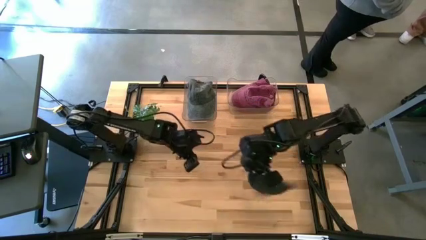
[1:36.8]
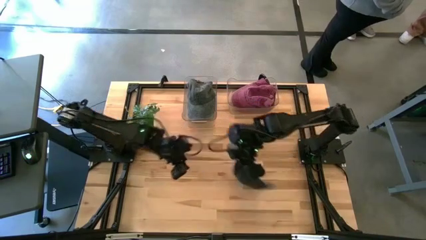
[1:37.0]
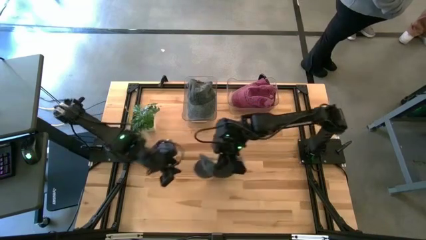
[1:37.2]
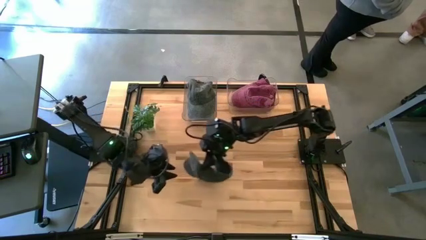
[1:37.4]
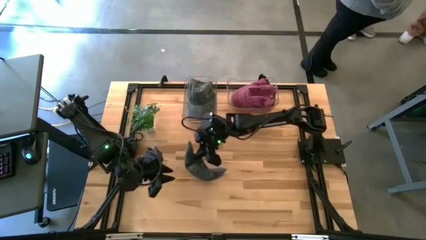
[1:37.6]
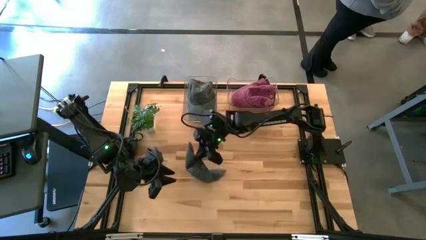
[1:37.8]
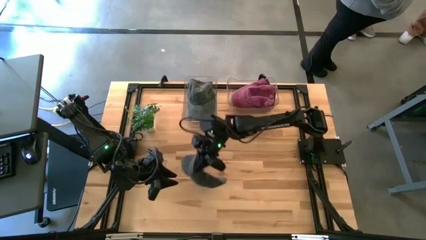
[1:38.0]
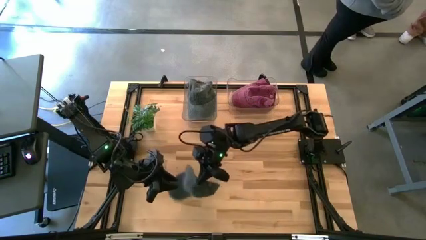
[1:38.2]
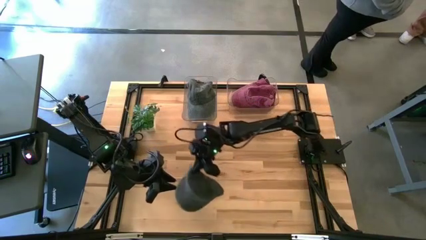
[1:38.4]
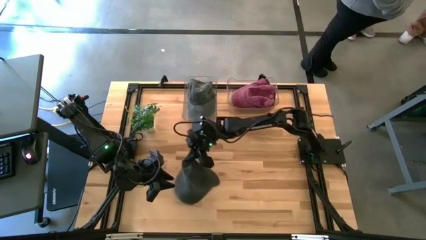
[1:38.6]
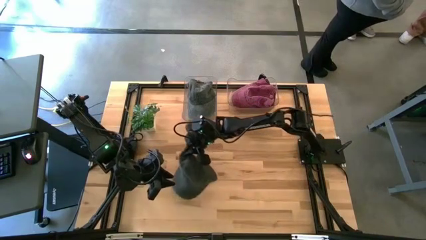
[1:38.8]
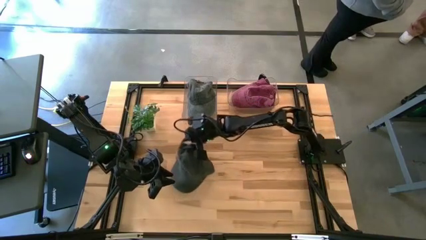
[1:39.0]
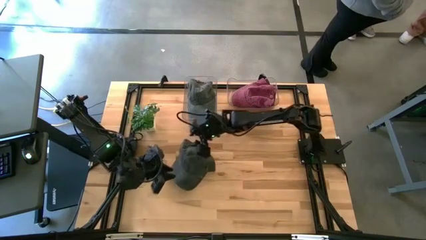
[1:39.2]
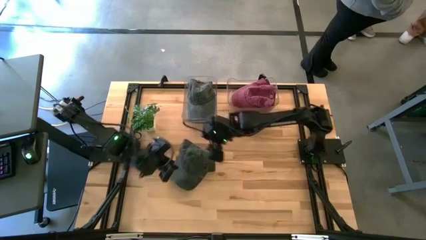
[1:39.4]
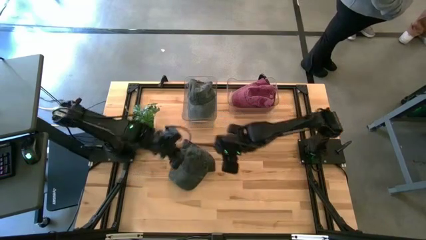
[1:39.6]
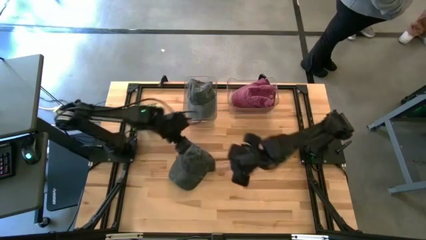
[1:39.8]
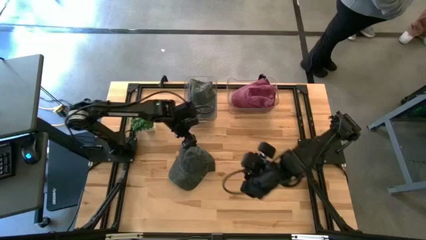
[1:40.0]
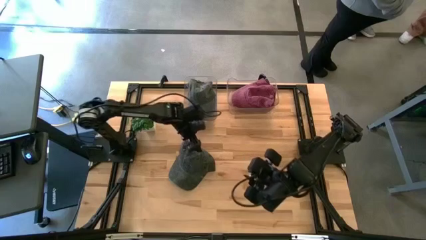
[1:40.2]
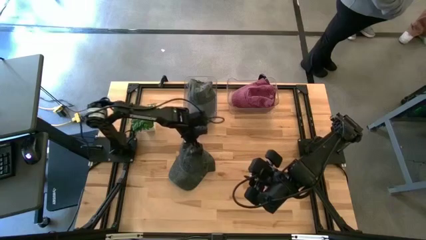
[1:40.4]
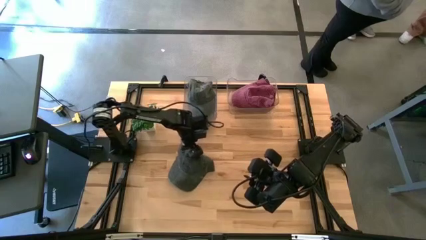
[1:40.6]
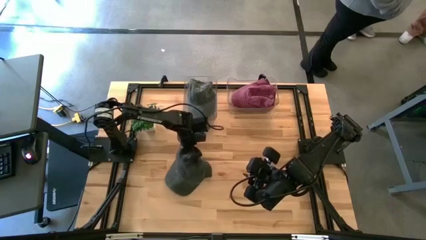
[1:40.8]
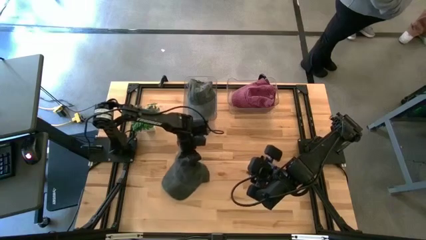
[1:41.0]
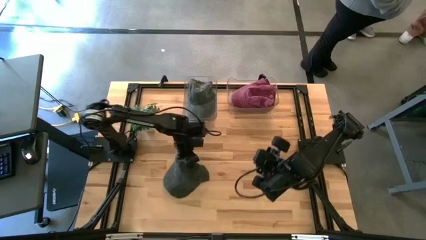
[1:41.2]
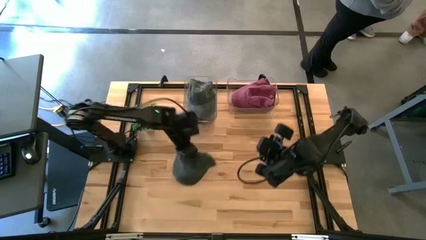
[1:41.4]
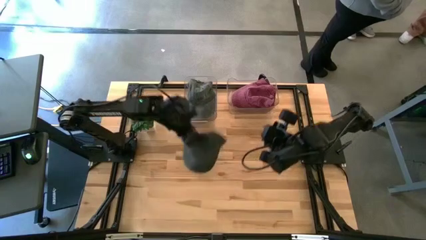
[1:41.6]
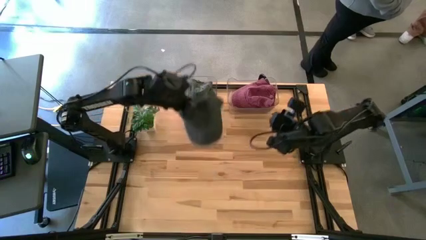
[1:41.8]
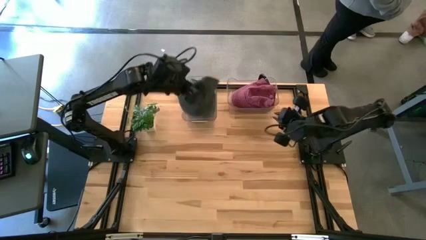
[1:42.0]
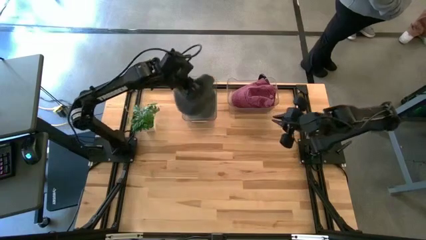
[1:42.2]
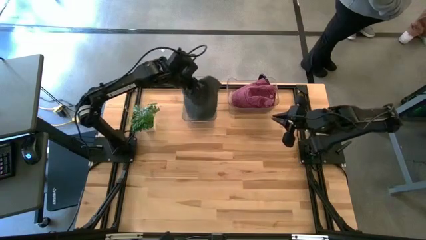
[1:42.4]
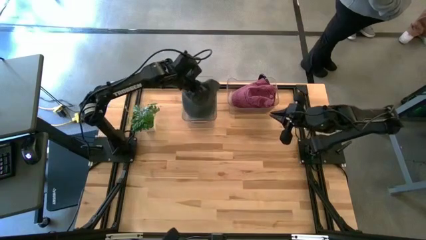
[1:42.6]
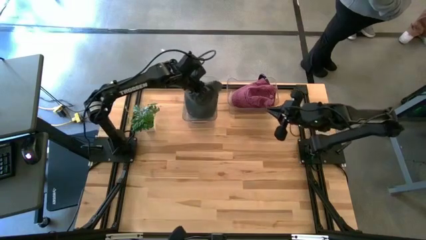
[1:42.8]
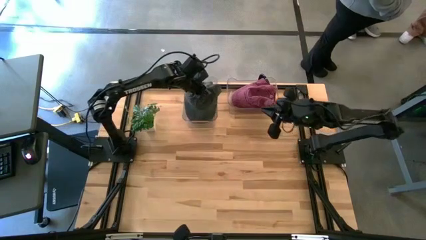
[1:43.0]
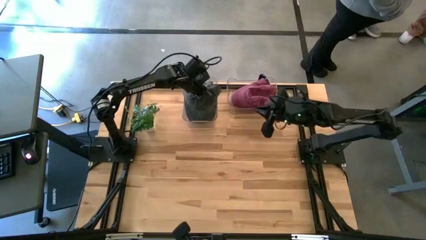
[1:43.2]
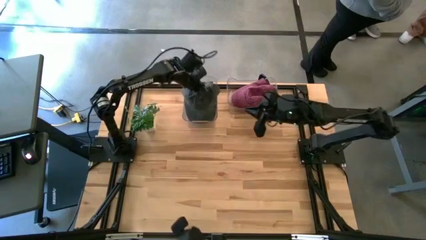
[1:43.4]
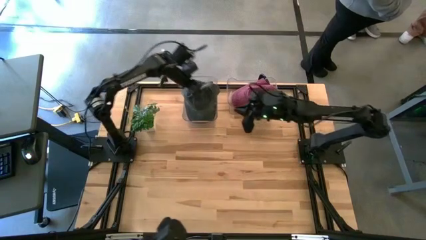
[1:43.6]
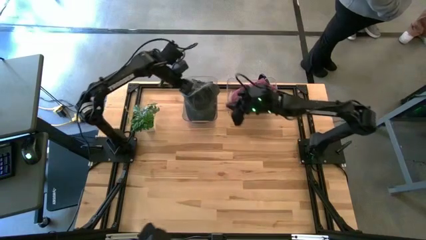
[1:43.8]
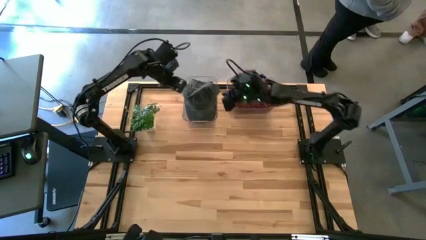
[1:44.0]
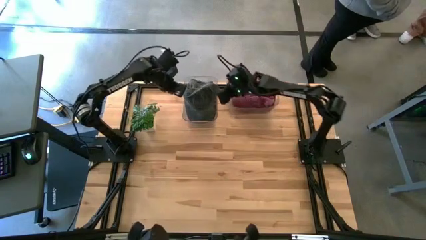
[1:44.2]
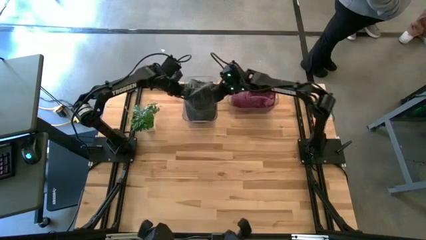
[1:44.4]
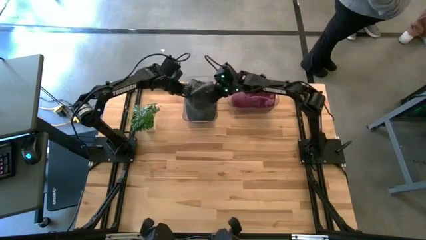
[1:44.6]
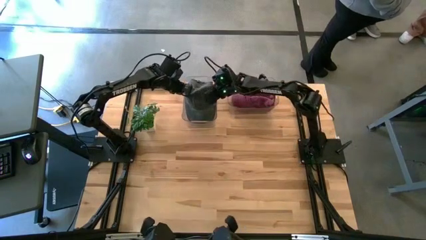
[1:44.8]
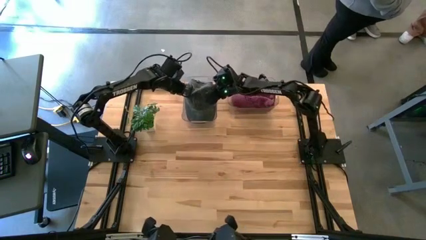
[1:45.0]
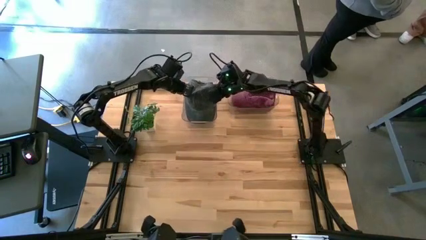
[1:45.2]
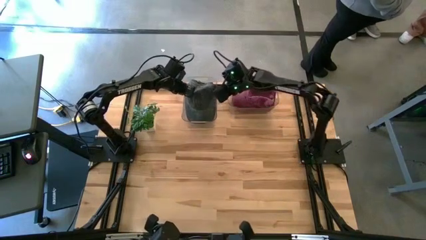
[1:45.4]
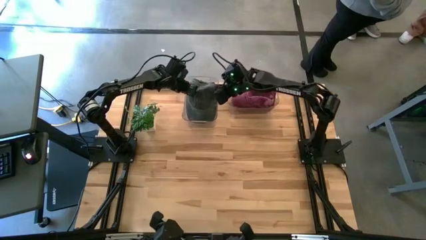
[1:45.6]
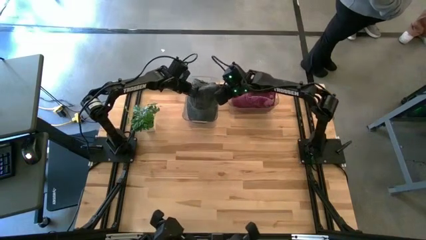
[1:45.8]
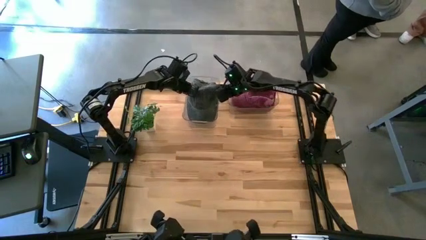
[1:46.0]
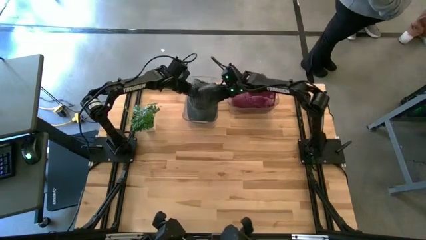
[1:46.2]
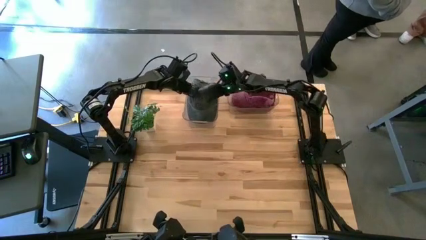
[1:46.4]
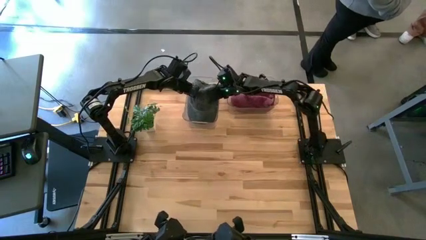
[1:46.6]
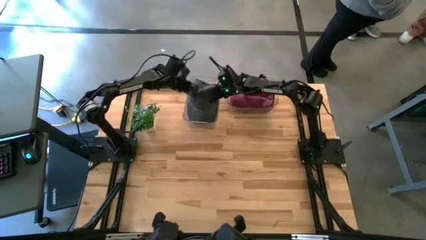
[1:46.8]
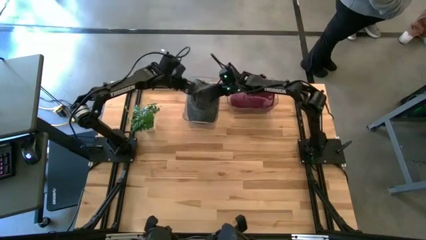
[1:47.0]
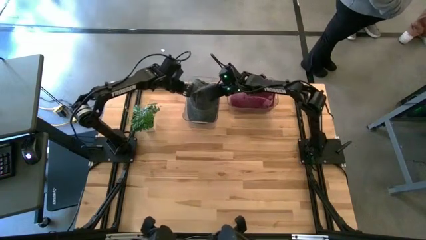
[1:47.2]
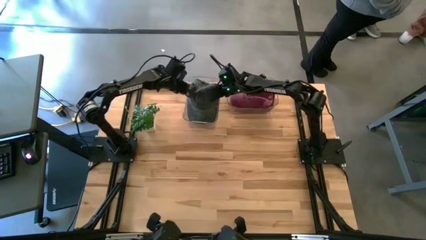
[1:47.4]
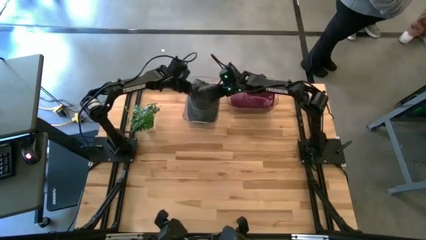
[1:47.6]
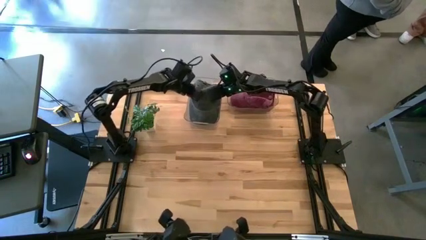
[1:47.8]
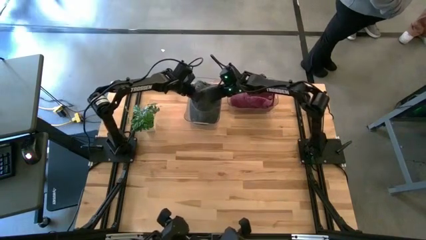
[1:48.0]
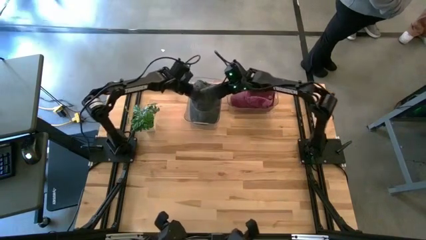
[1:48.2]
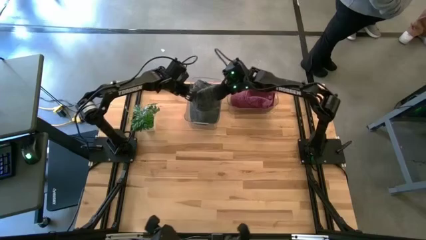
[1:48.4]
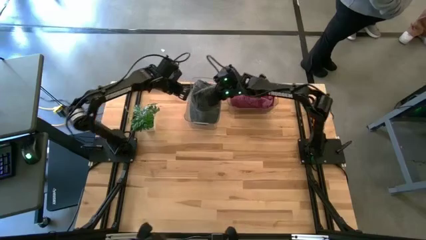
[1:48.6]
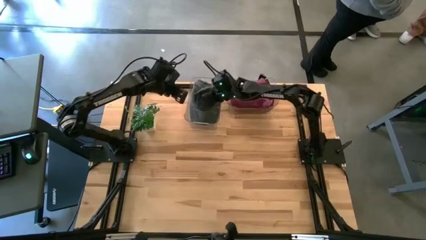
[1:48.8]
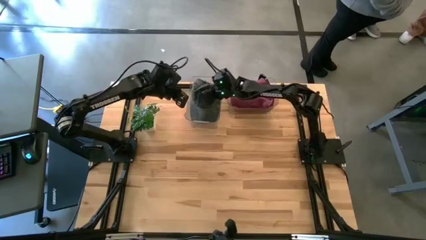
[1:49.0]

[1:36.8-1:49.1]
Task: Pick & Place hat
Put the black cap into the left transparent bin

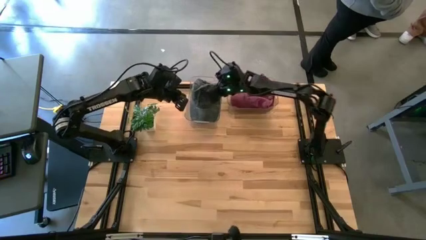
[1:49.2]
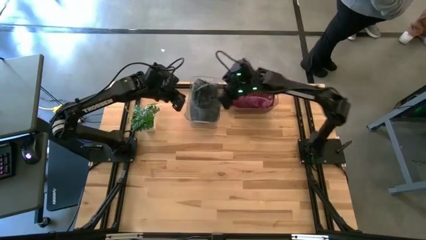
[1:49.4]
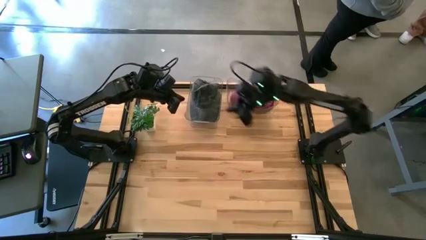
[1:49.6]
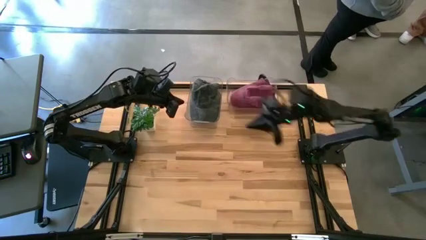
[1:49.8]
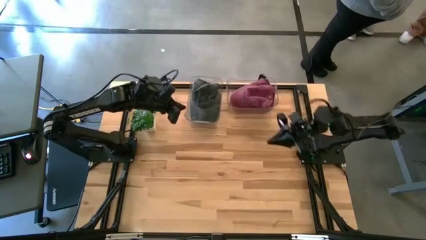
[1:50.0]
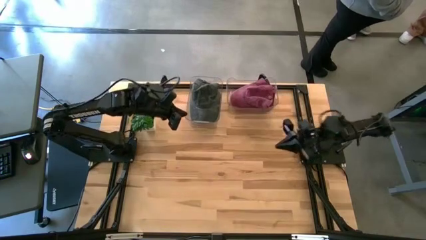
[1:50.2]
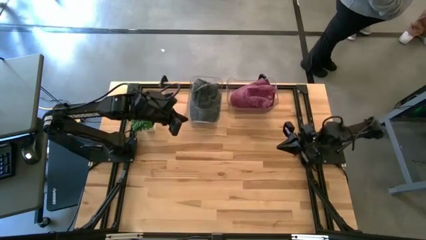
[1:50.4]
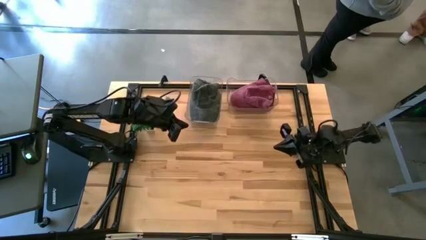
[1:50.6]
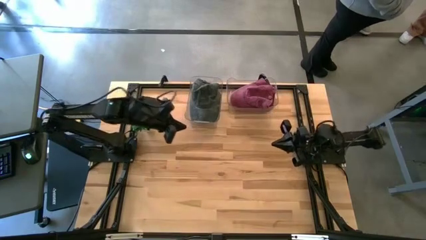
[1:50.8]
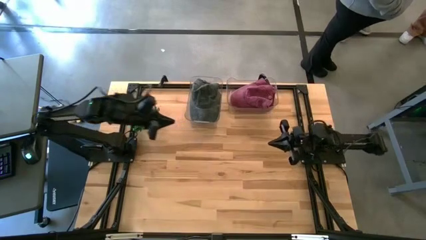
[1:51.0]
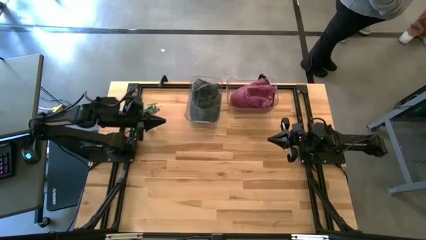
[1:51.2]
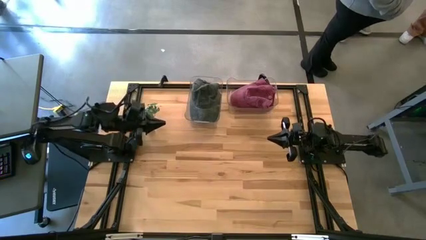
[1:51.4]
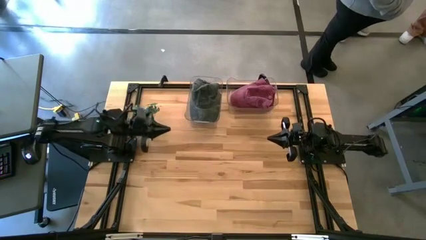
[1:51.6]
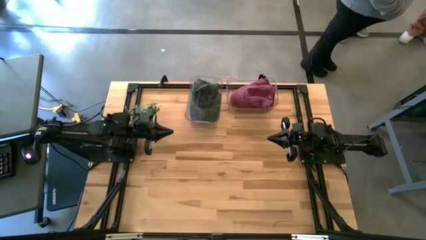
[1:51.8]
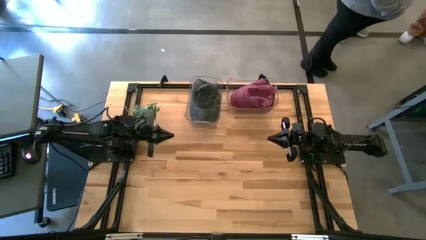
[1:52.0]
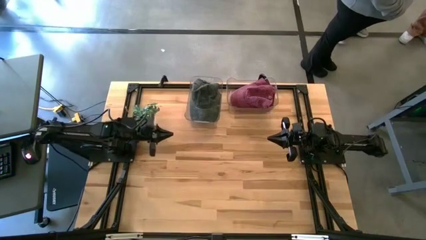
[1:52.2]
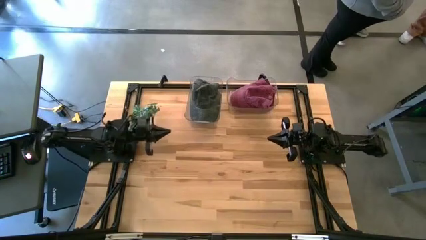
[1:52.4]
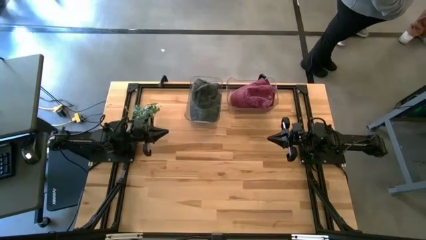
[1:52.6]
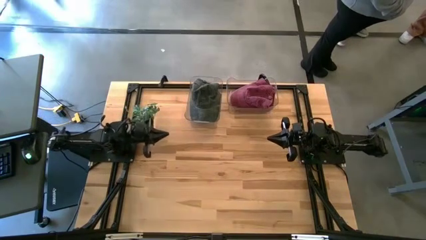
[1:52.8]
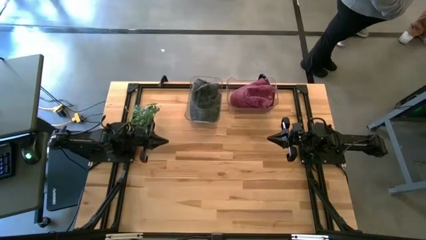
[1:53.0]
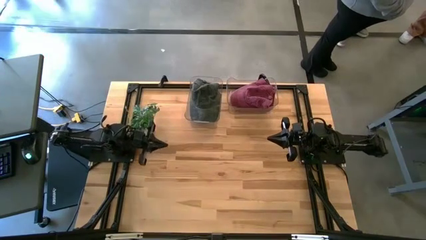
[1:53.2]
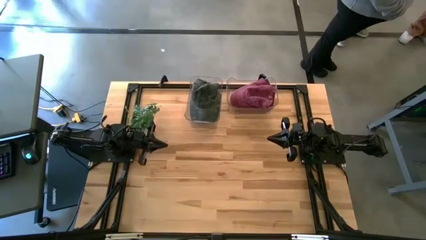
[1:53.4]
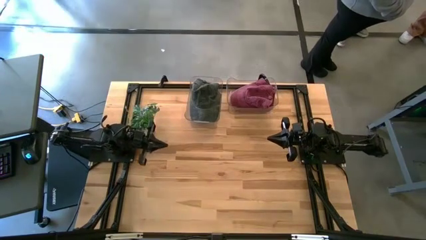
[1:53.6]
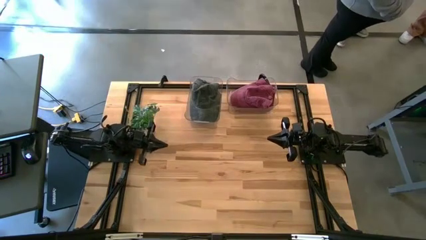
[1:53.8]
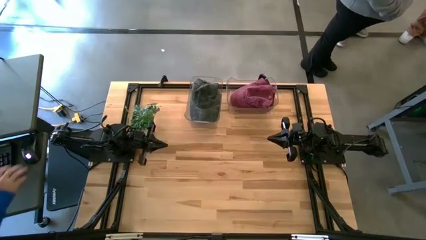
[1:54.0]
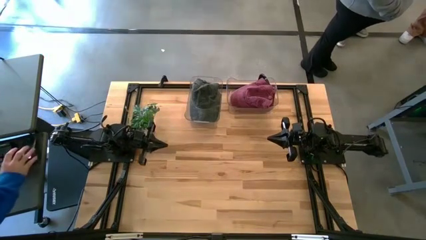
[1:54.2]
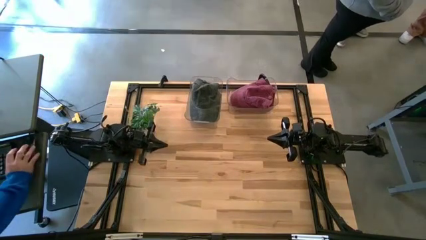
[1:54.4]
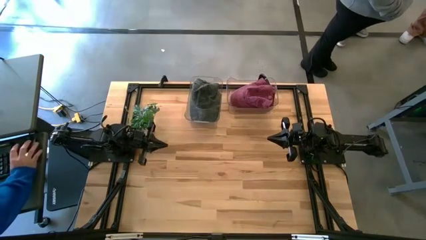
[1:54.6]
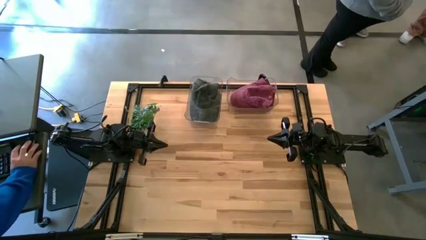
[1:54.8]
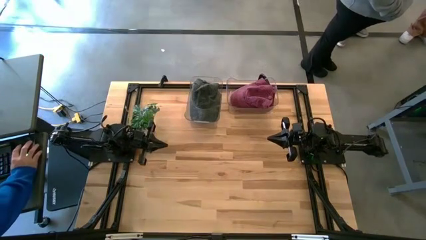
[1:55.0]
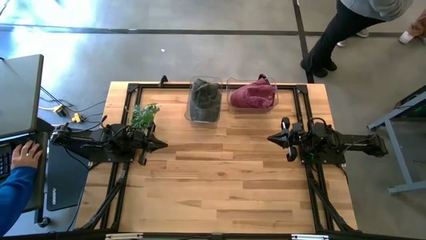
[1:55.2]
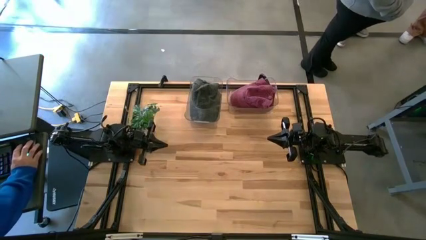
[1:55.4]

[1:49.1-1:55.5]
Return to Home Position
